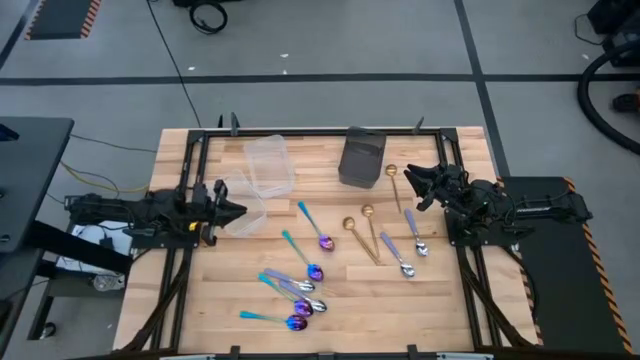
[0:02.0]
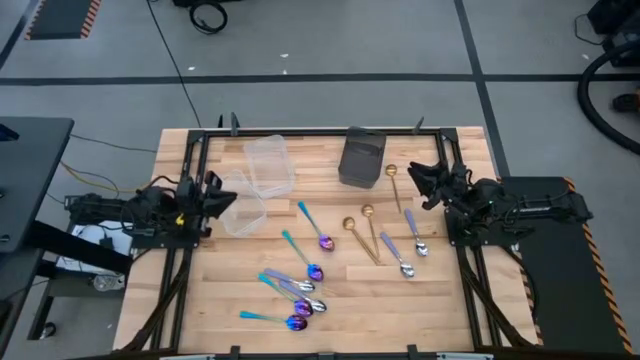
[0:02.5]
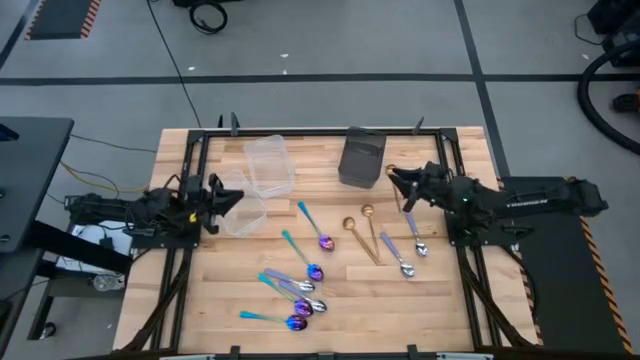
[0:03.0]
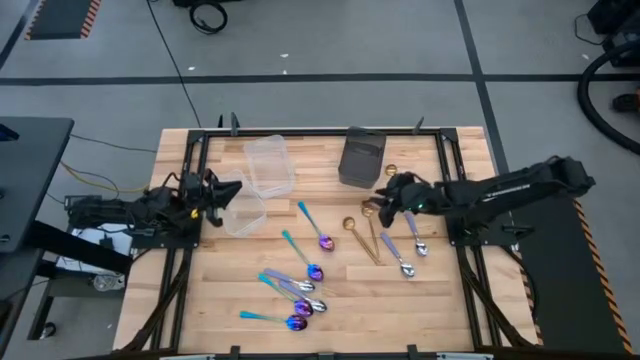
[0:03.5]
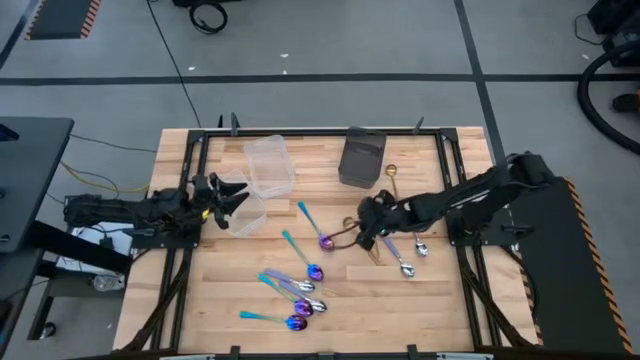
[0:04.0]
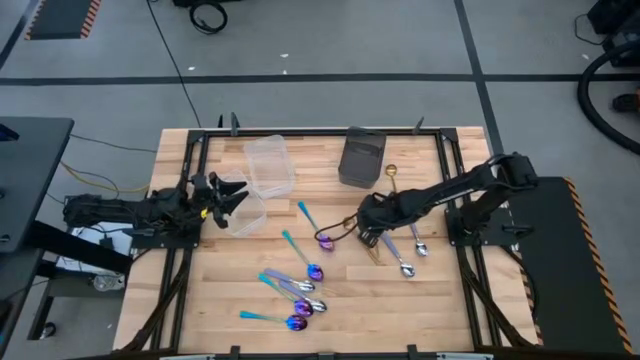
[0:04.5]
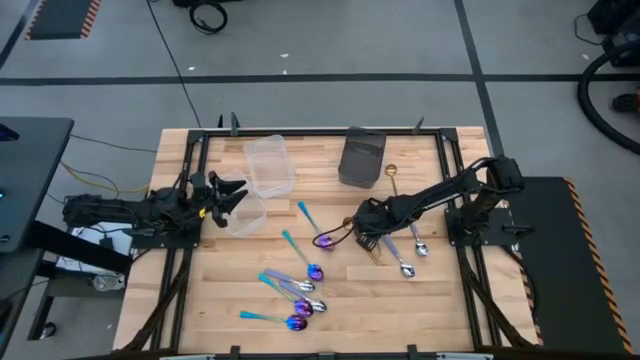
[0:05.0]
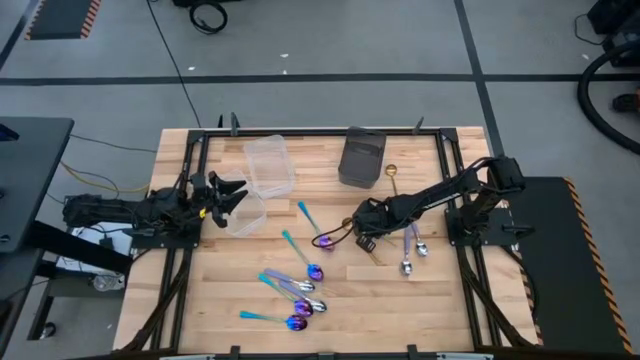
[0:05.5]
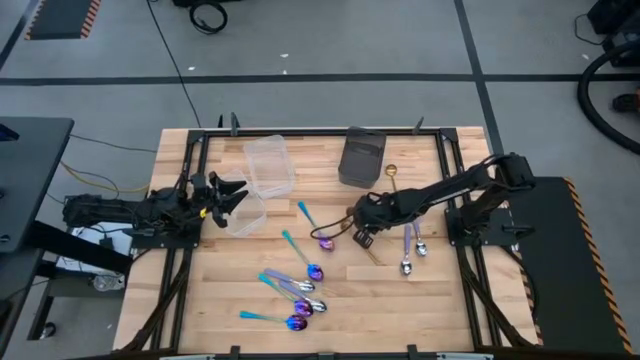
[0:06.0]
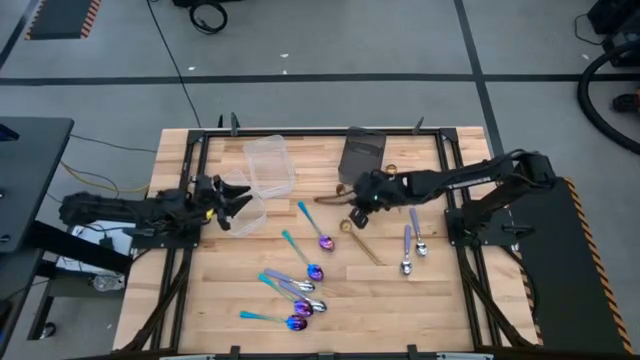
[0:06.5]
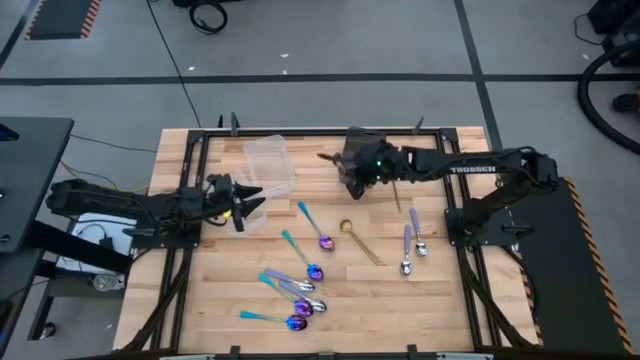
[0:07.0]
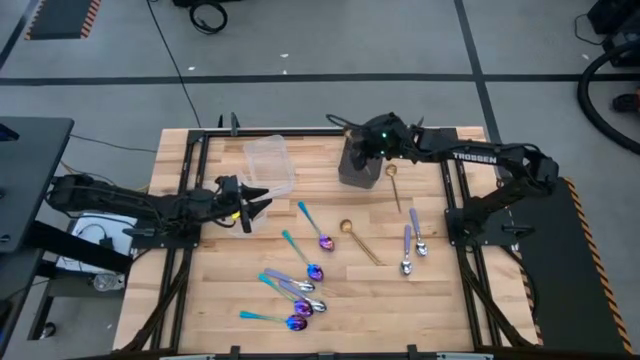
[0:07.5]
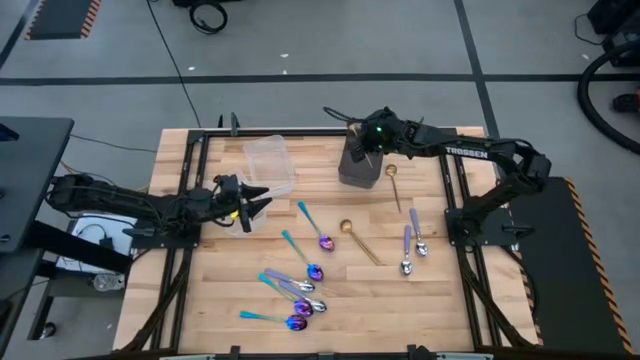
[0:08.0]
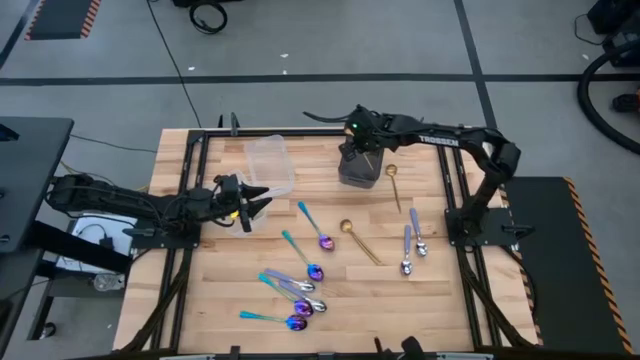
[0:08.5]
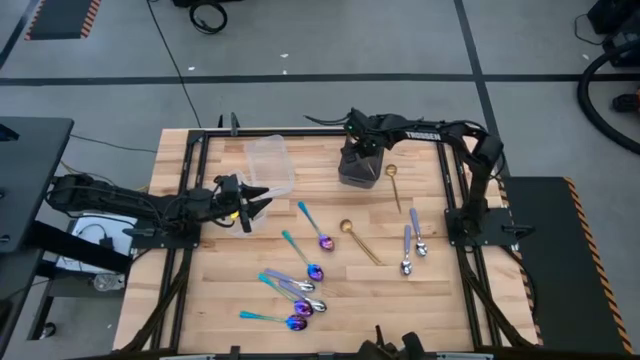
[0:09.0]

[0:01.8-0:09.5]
Task: Sort silverware by color (type)
Put the gold spoon into the black bin

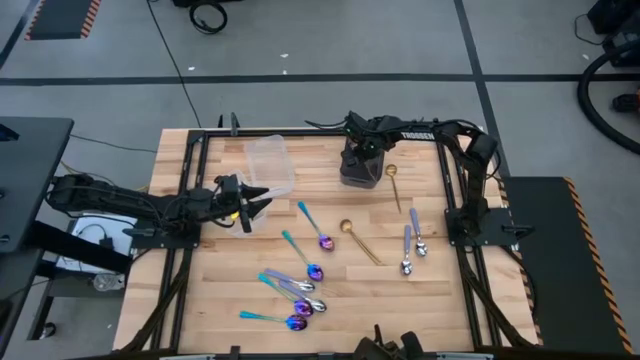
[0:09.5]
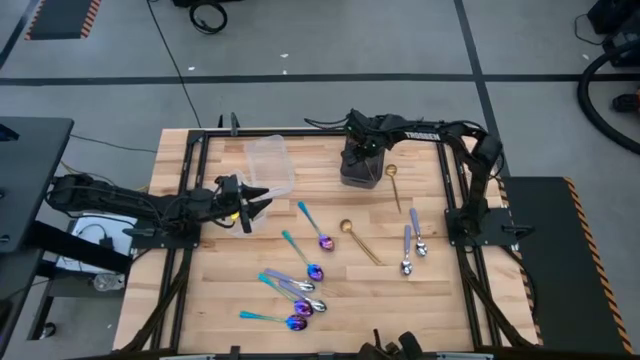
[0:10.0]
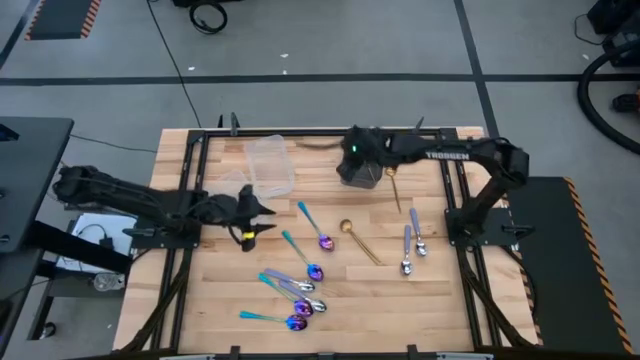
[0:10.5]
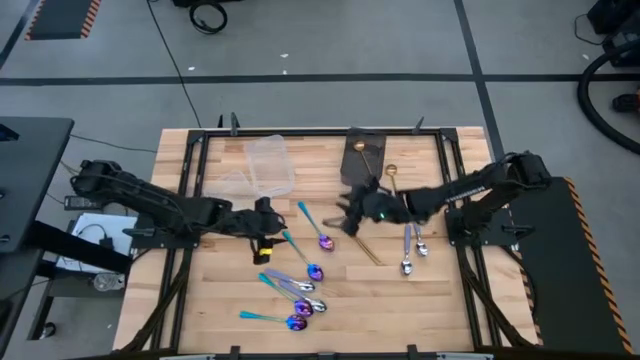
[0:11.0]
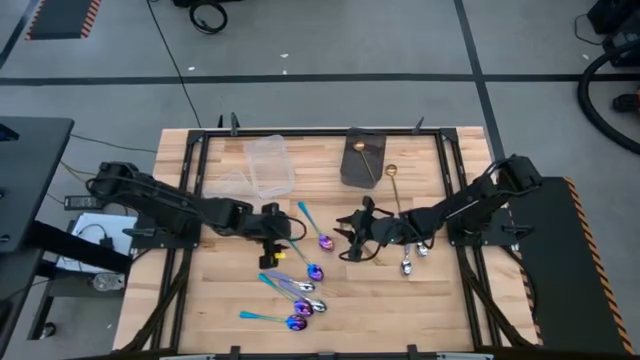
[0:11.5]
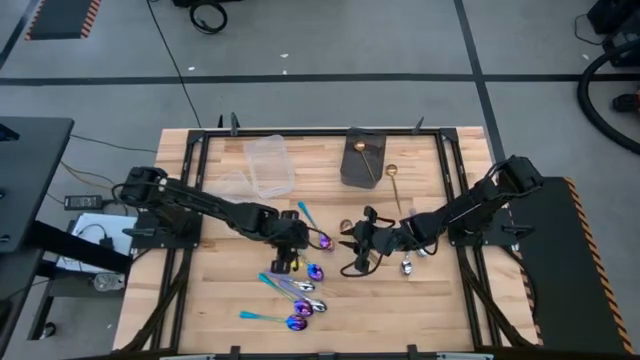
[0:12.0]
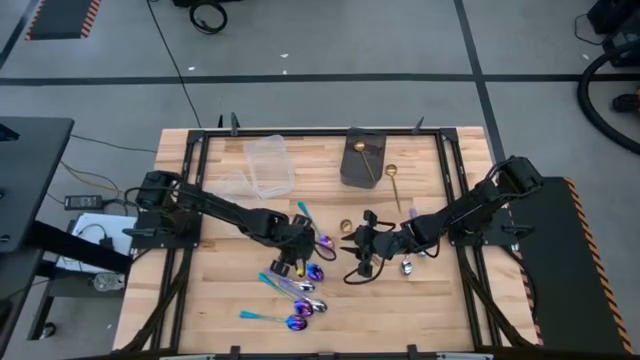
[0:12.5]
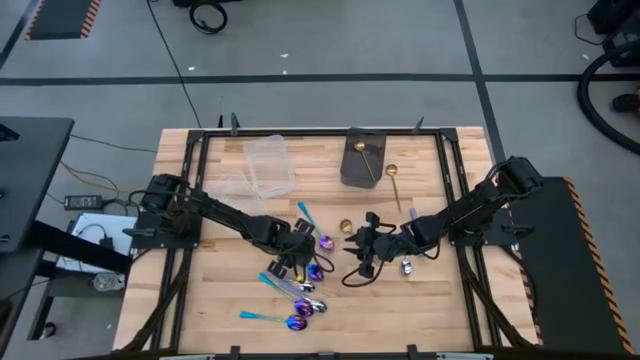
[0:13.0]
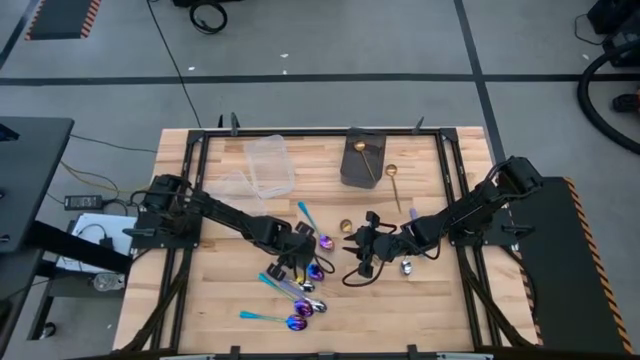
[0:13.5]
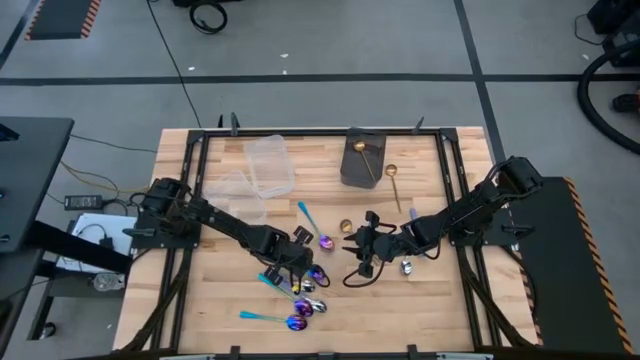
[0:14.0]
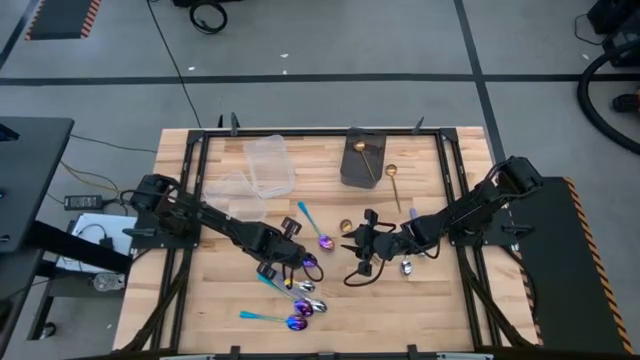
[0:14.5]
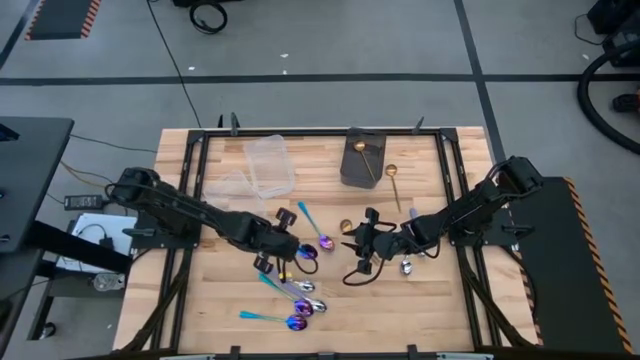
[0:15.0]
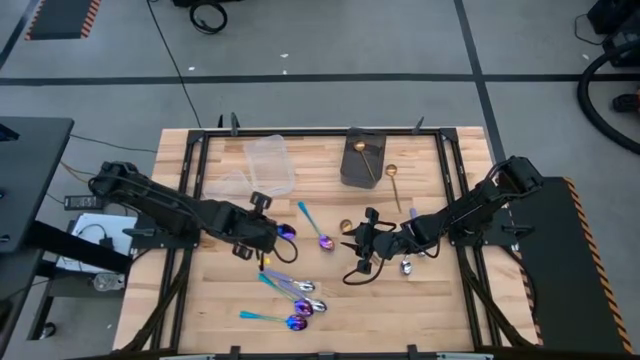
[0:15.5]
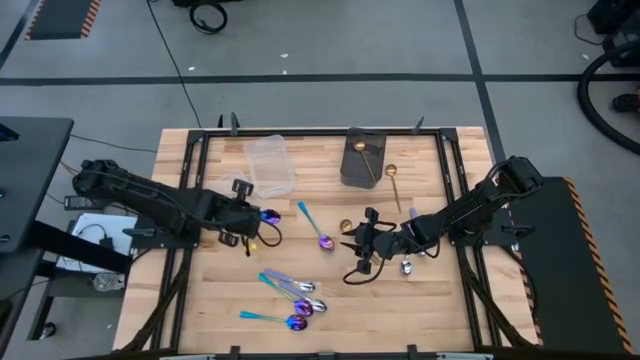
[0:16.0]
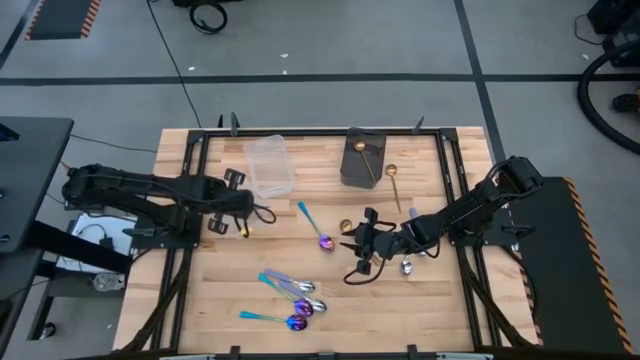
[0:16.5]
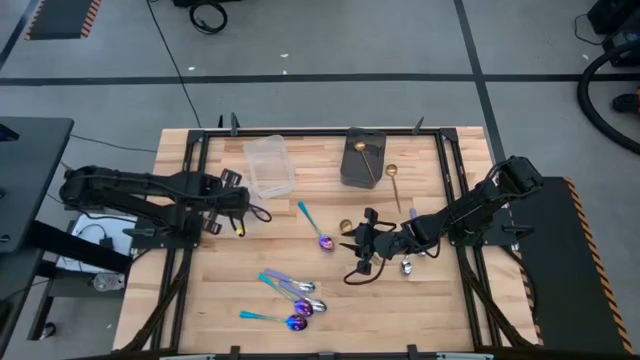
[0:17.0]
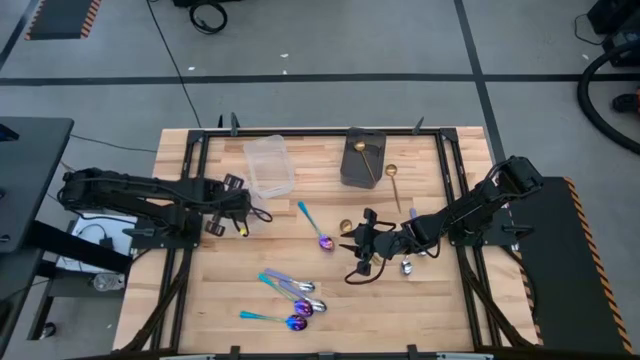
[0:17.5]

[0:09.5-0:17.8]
Put the blue spoon into the left transparent bin

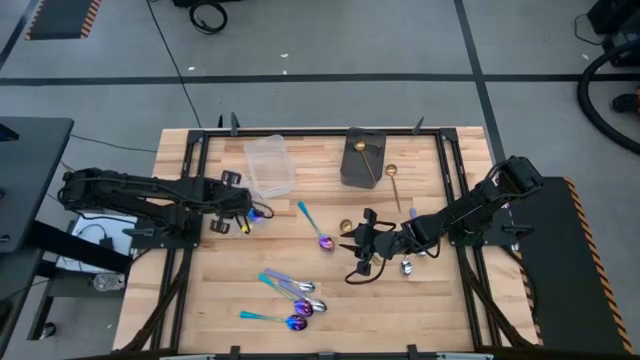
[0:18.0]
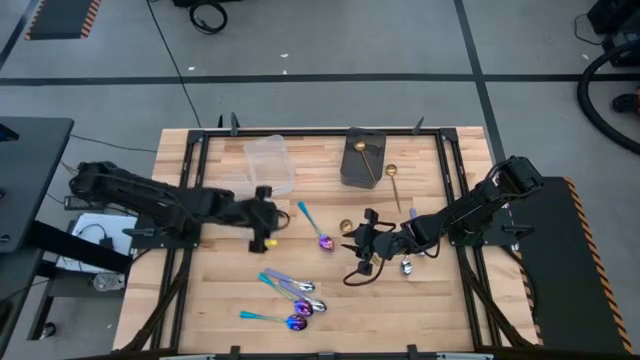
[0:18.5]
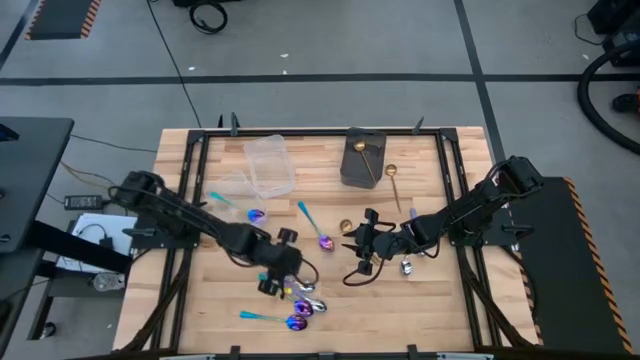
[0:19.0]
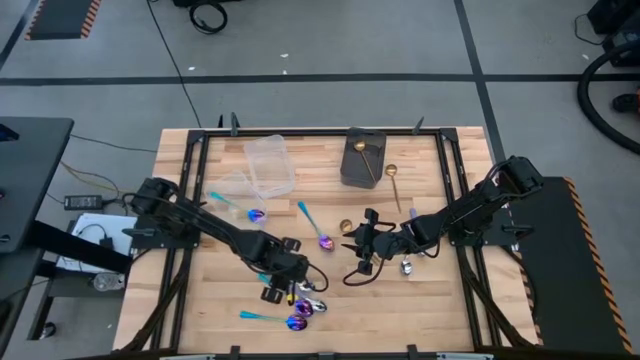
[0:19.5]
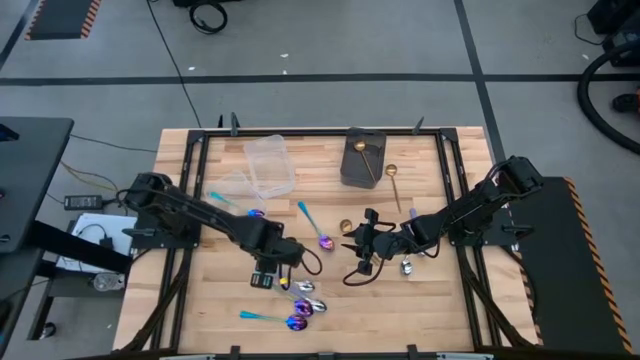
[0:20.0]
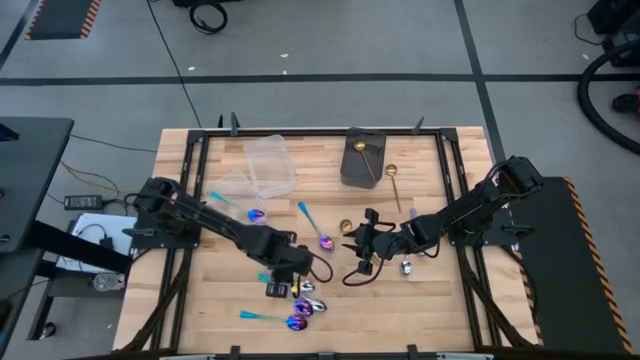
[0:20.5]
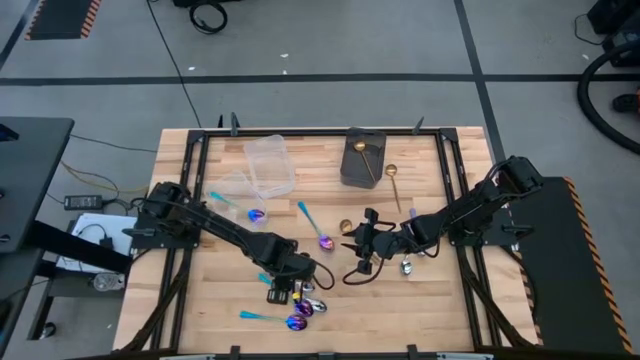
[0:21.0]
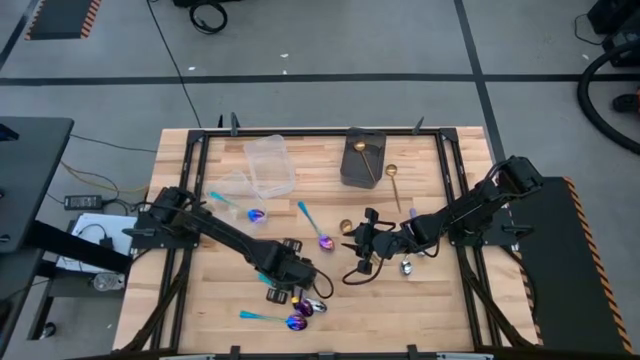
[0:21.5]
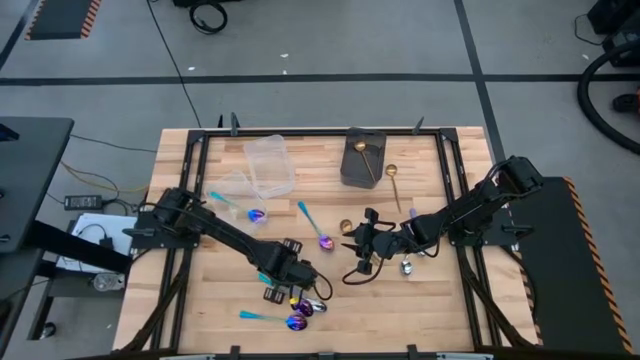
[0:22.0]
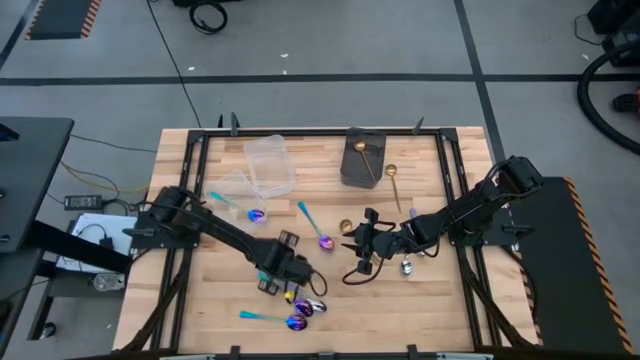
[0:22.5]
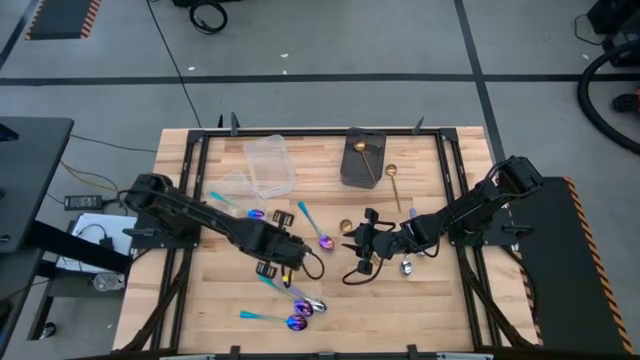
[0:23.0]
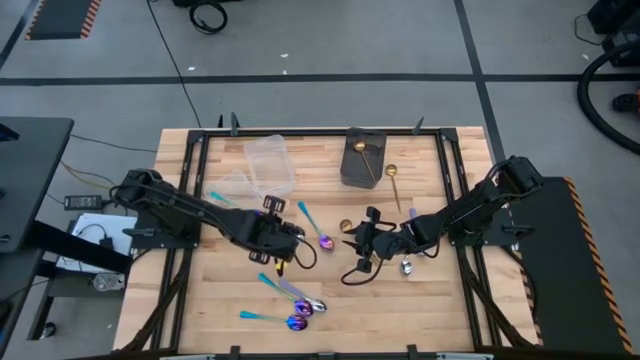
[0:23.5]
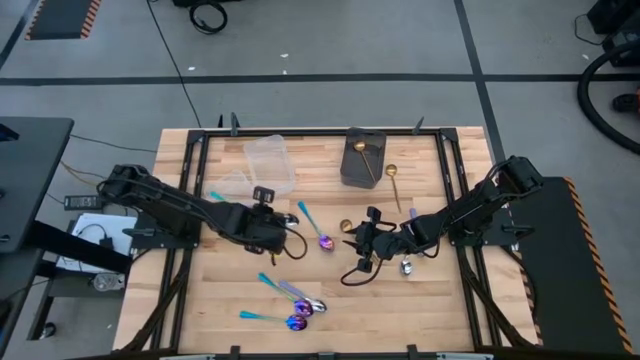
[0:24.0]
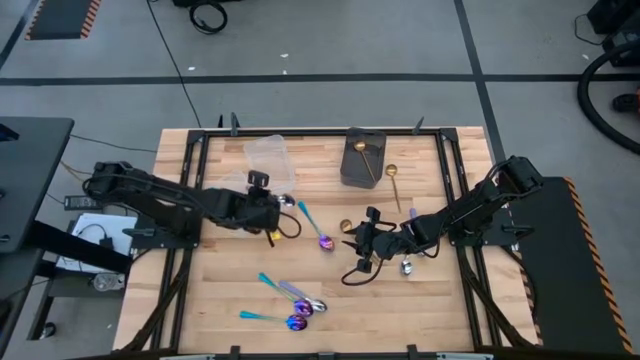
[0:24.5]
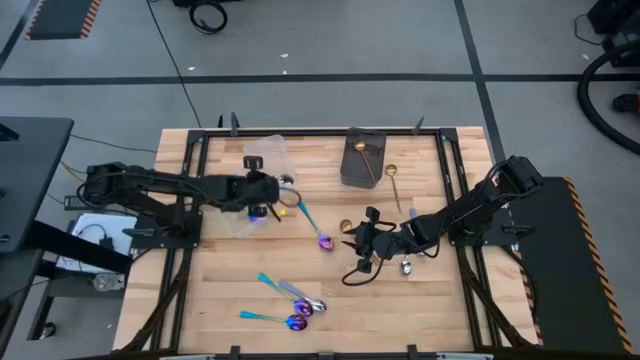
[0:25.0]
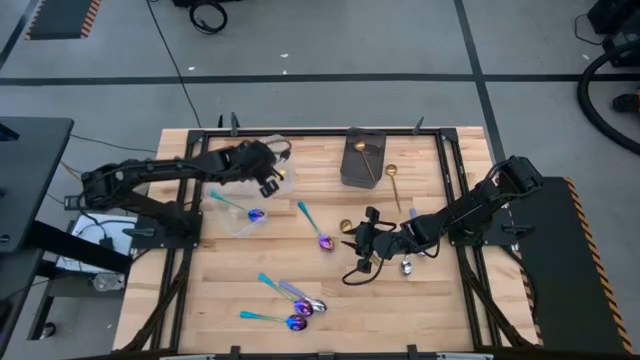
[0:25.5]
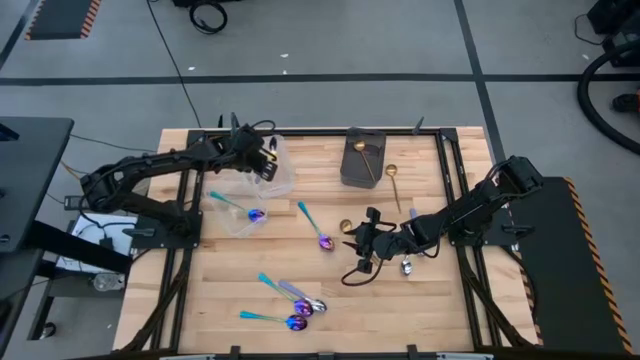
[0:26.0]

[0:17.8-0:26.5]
Put the purple spoon into the right transparent bin
